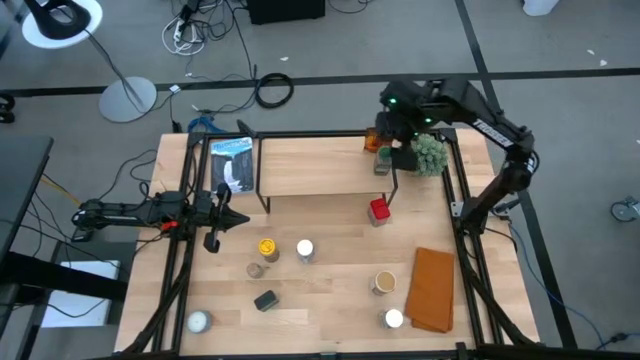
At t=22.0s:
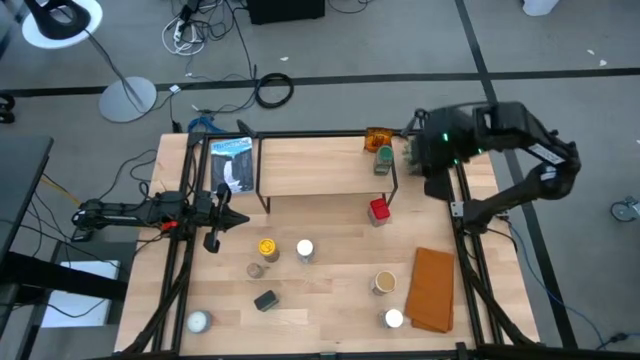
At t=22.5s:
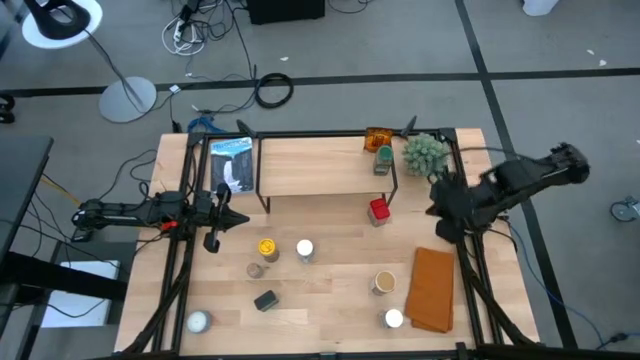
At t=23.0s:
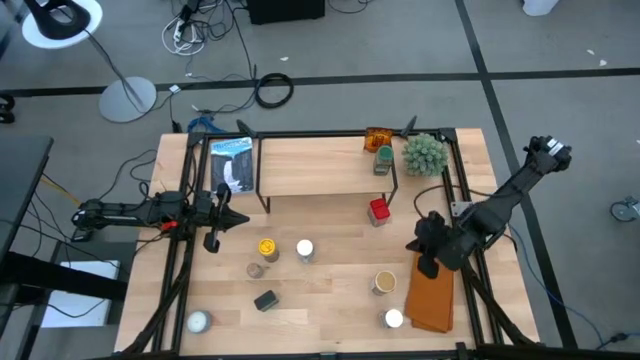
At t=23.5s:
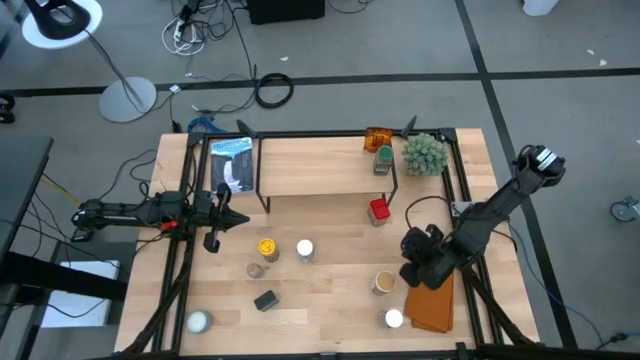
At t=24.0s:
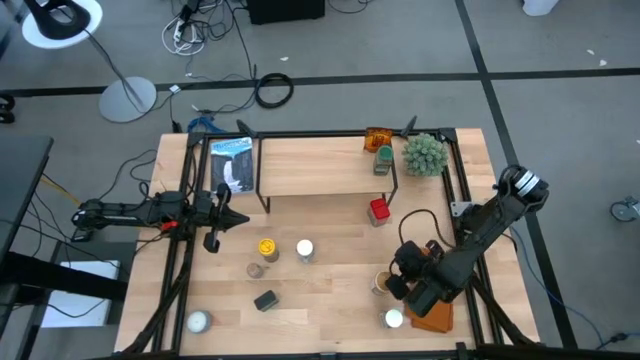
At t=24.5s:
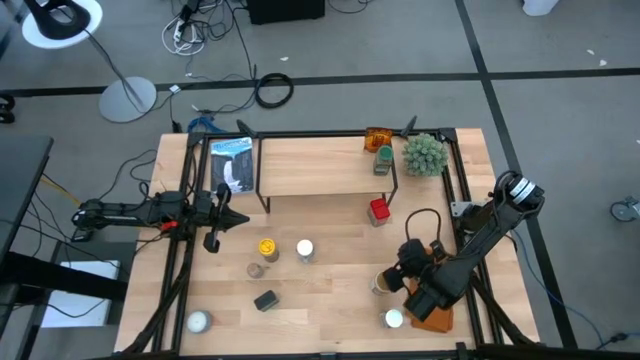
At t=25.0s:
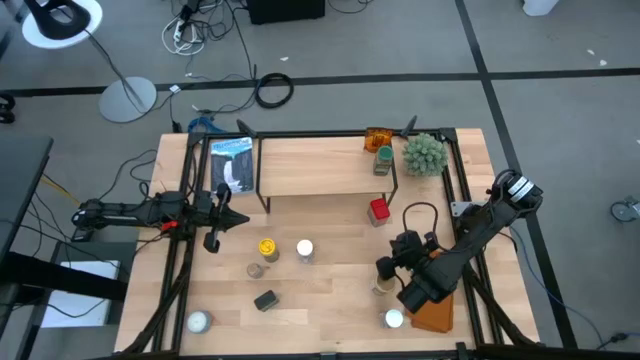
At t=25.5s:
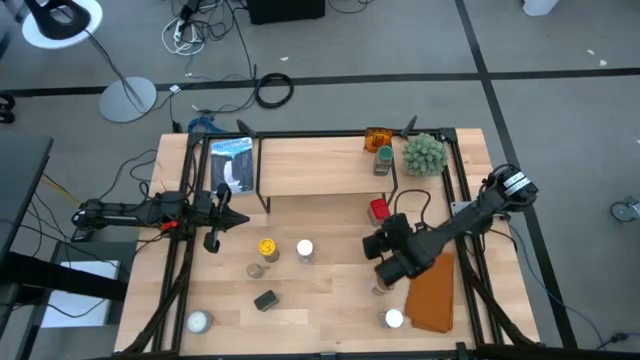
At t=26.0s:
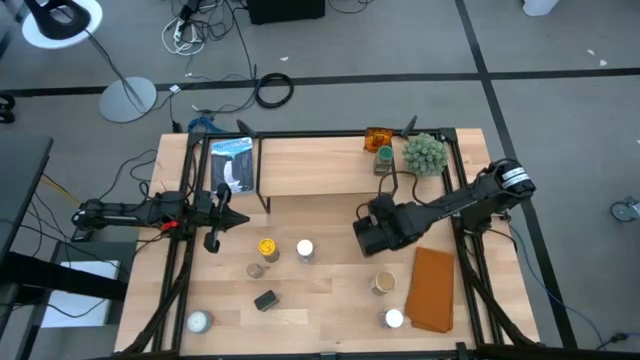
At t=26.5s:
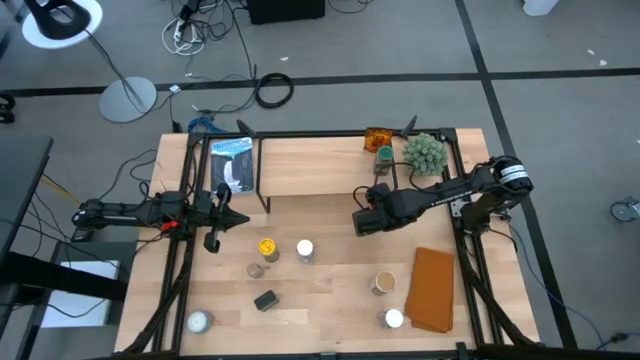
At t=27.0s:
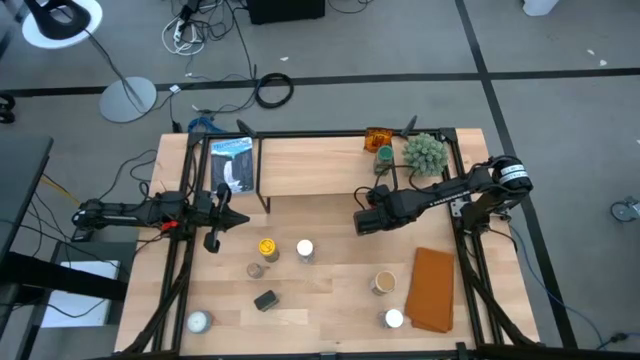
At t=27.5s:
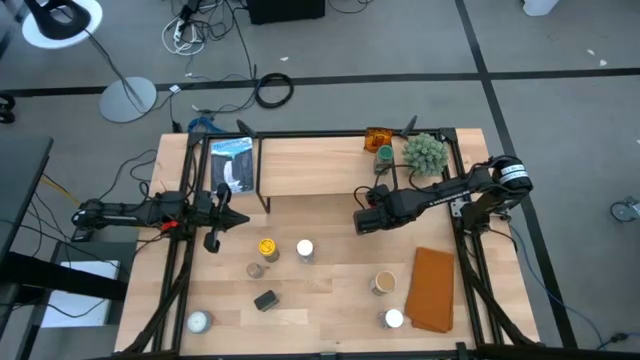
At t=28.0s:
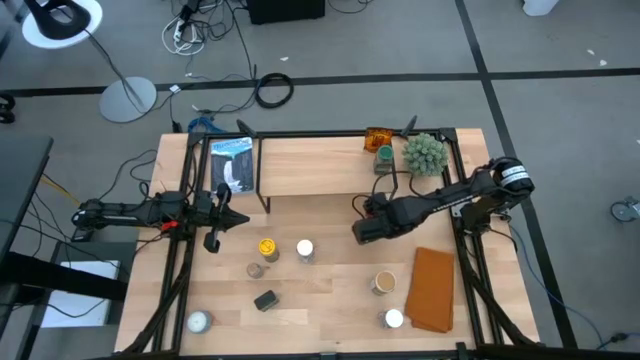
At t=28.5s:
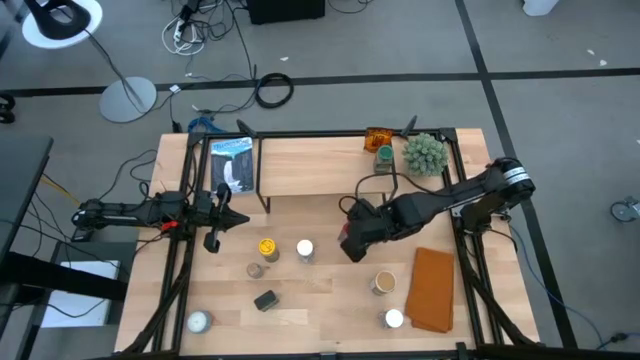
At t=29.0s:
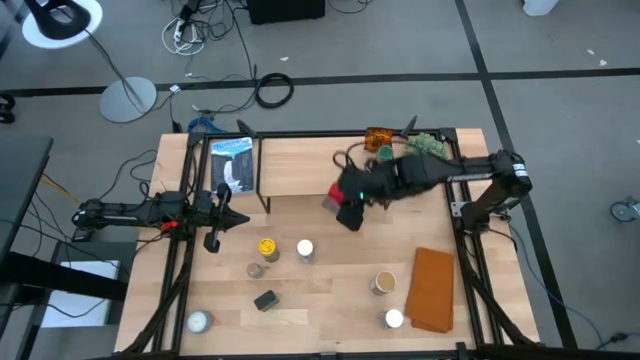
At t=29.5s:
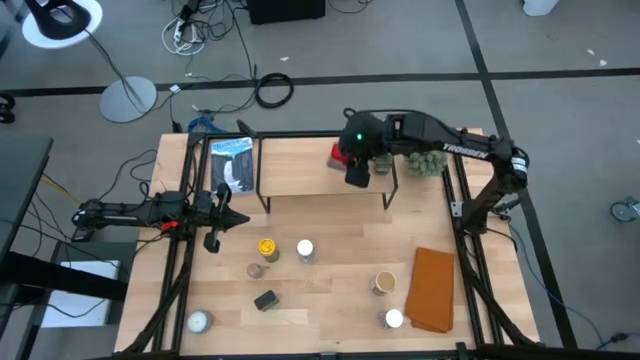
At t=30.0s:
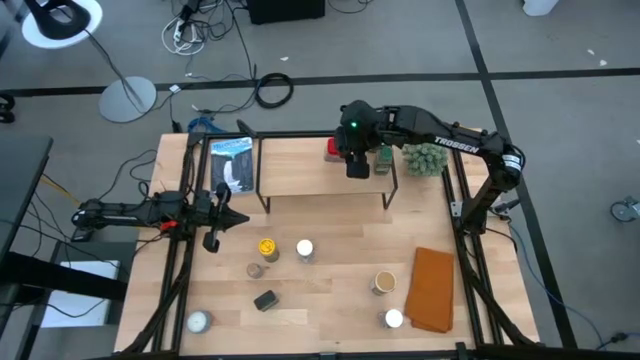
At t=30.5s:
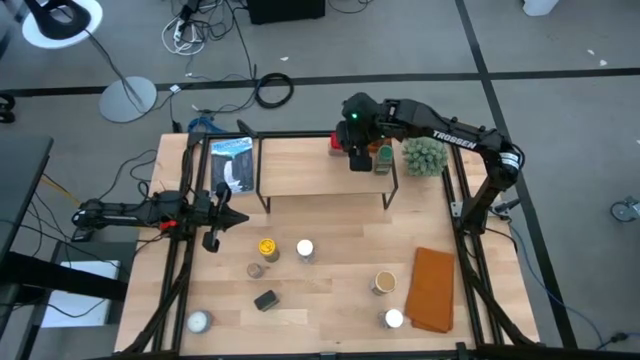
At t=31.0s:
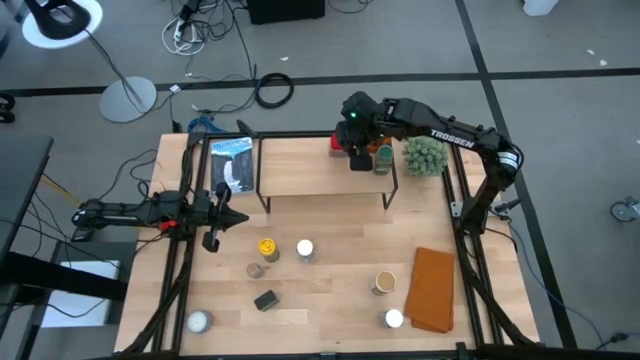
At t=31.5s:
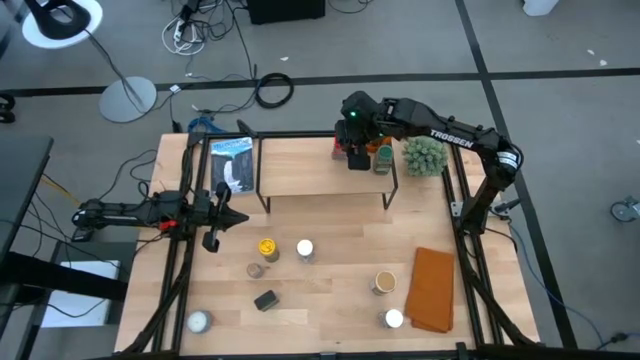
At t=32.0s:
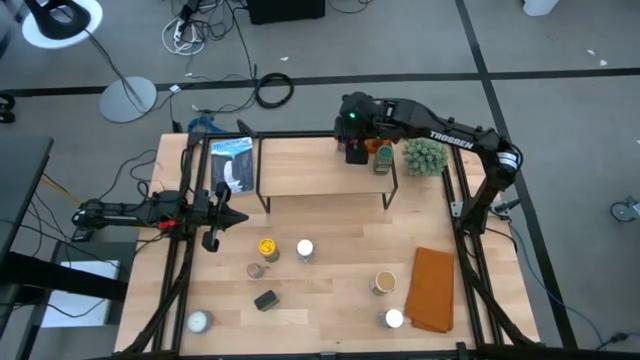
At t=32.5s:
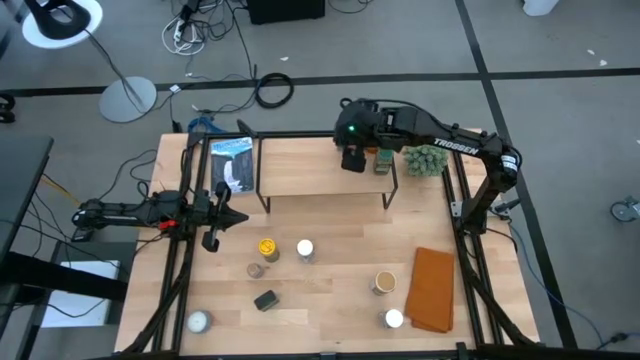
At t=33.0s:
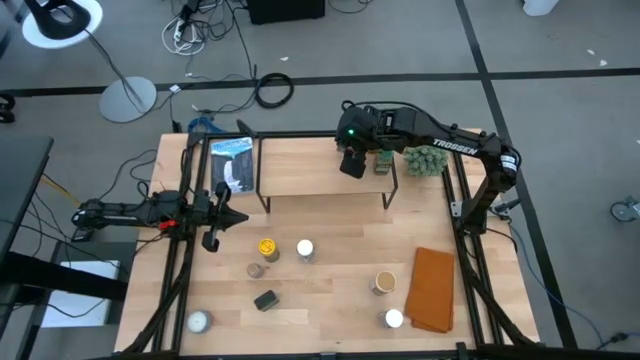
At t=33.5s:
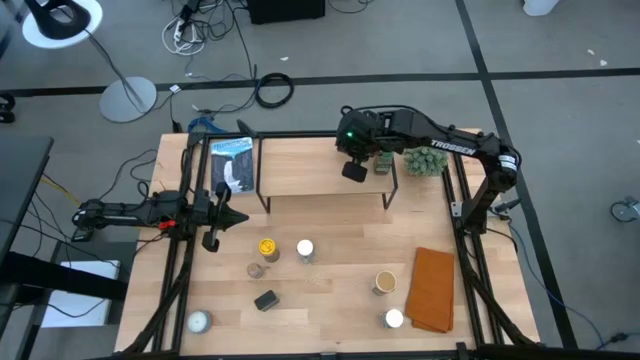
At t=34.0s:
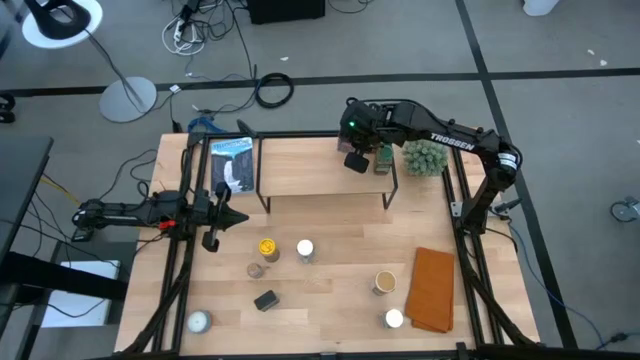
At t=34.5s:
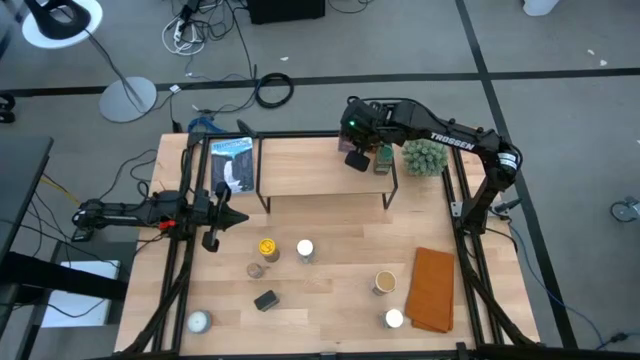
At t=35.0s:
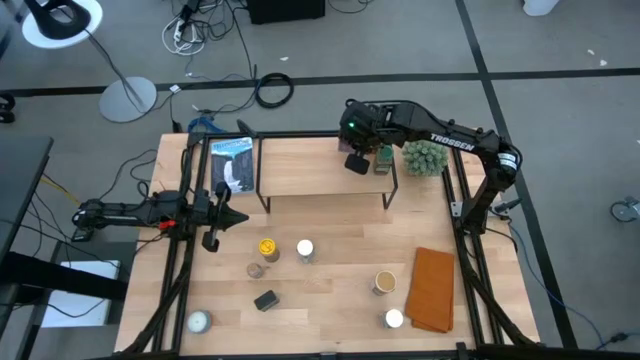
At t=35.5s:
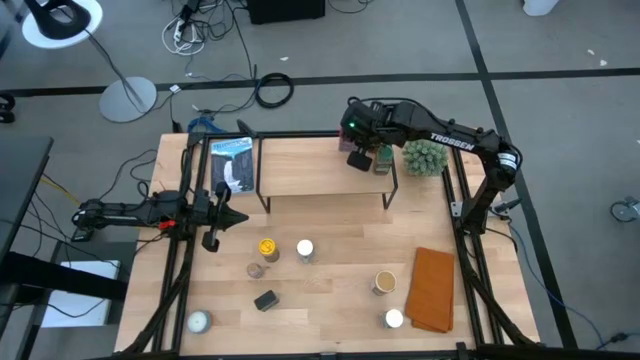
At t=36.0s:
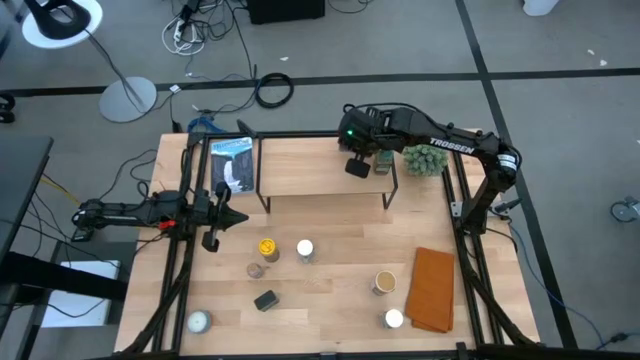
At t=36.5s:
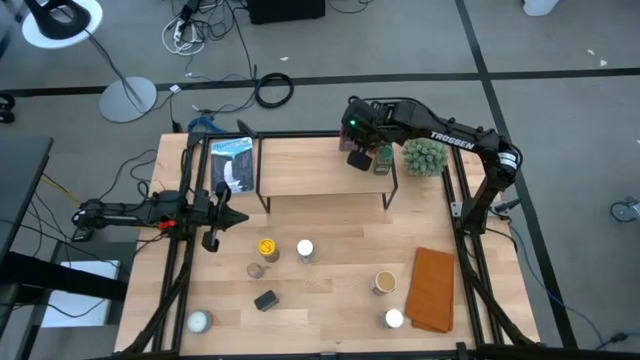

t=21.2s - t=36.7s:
Task: Shelf spices
Put the red seasoning can on the shelf

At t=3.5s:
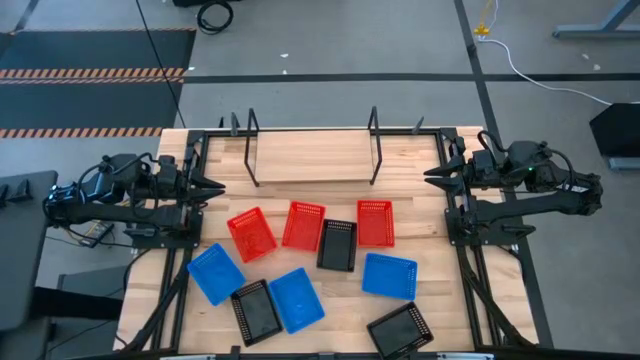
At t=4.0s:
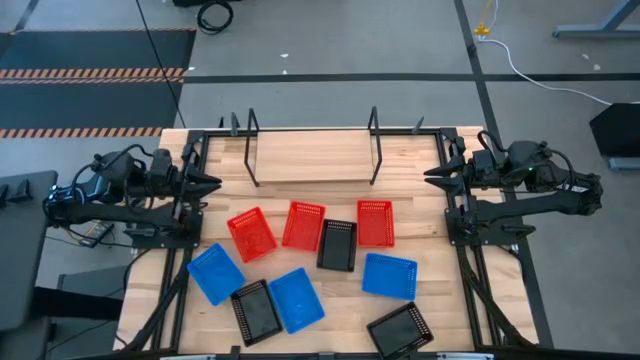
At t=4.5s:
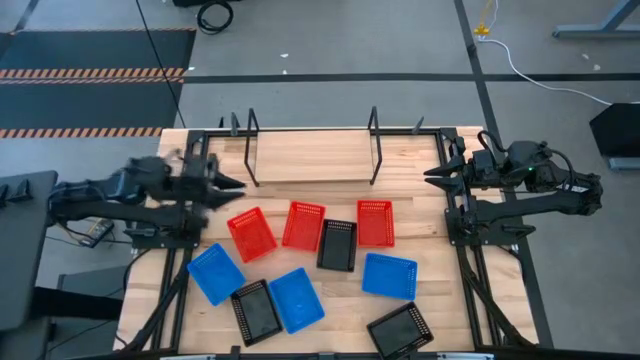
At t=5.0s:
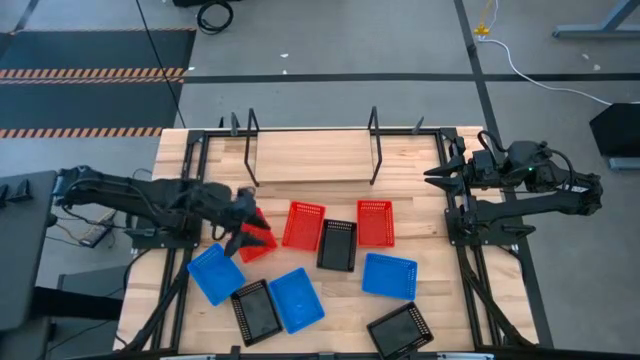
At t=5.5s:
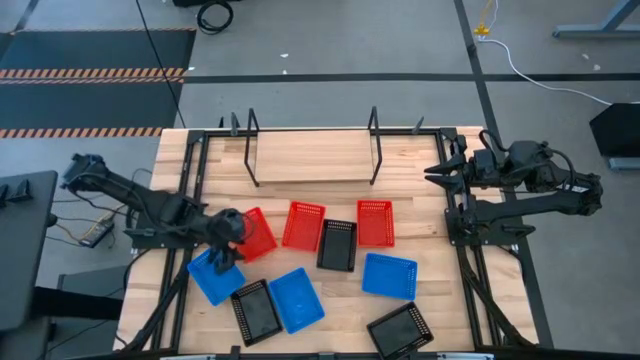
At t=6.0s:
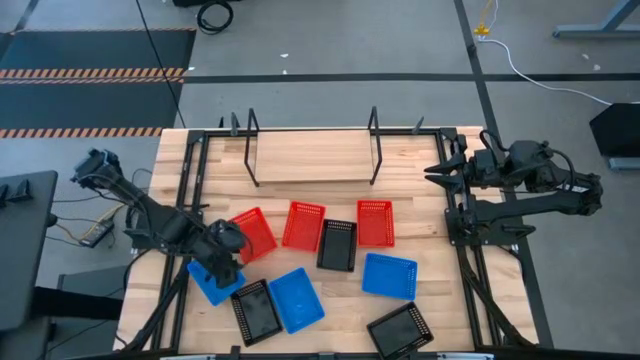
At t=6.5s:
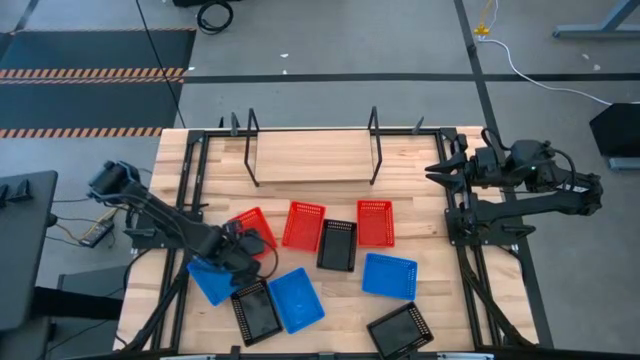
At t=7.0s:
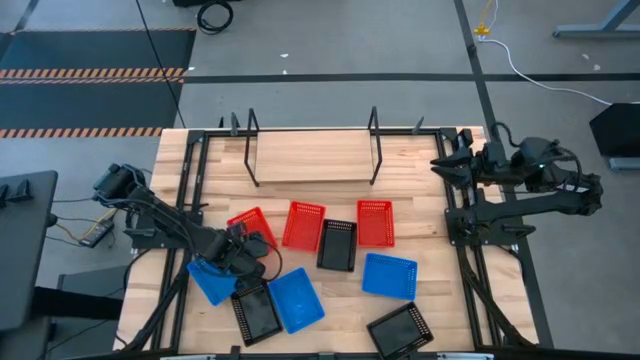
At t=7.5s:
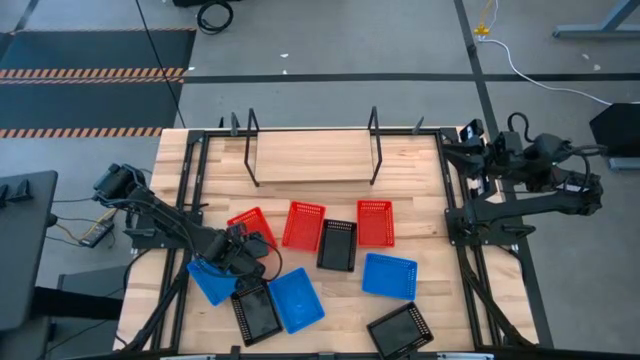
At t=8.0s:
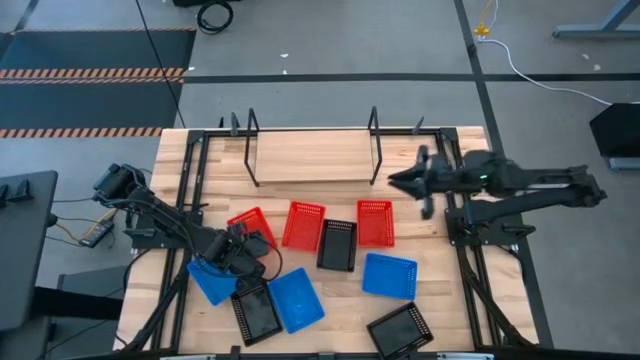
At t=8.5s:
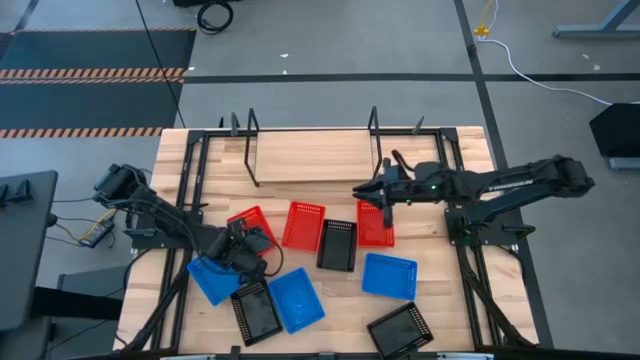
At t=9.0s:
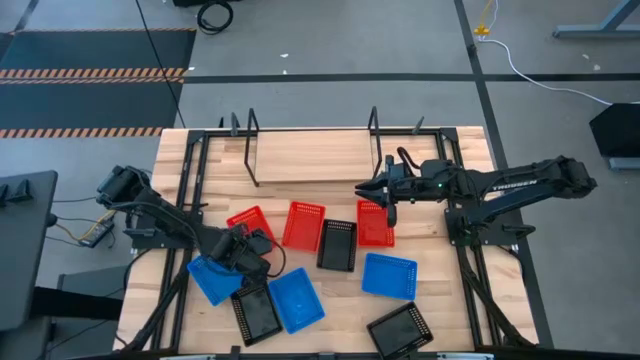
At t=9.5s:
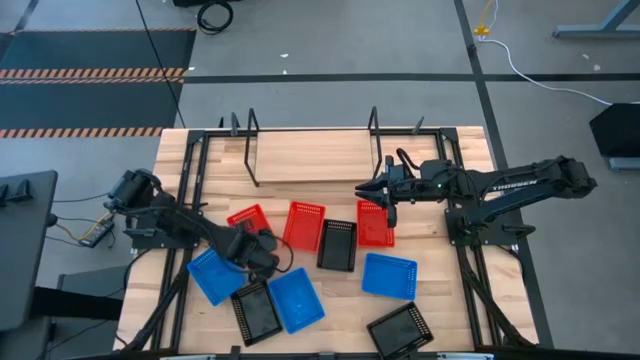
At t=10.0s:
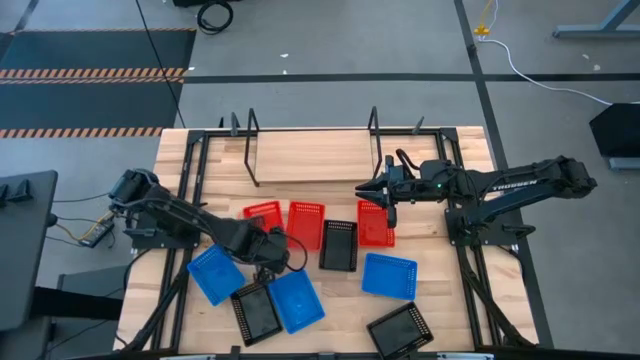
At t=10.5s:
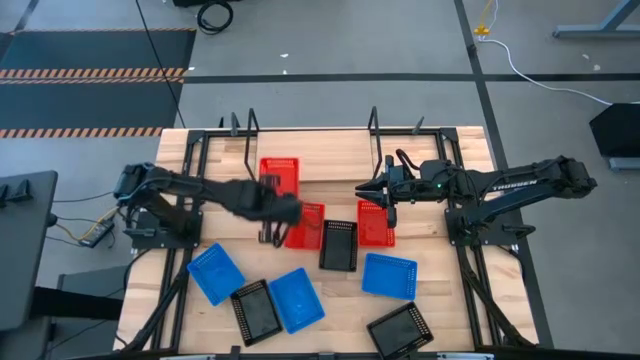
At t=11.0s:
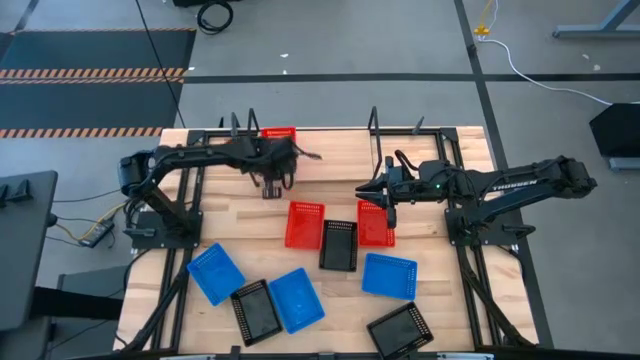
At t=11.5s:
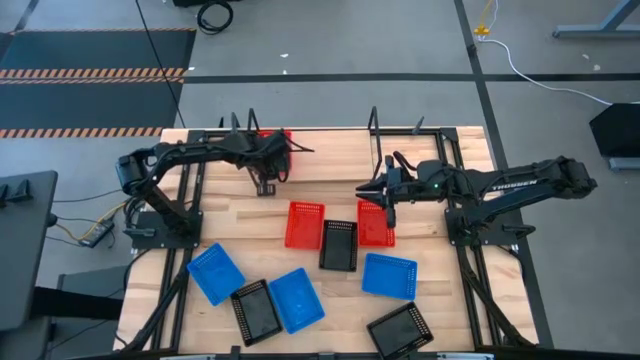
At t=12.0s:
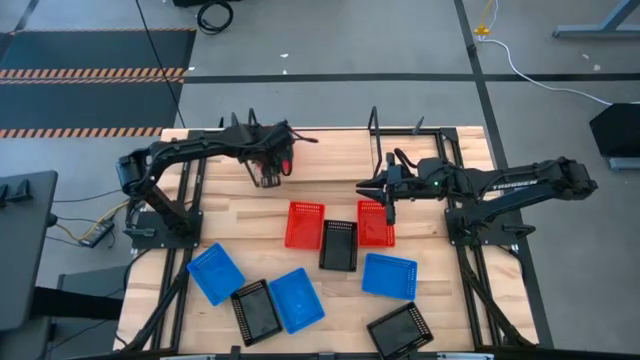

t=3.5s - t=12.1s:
Task: Stack baskets on shelf by color
Put the left red bin on the shelf
